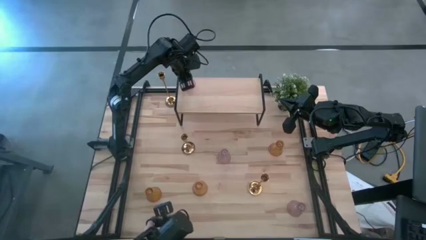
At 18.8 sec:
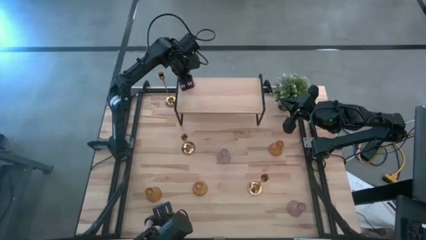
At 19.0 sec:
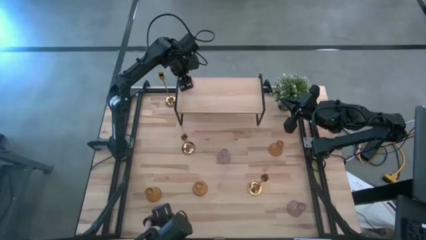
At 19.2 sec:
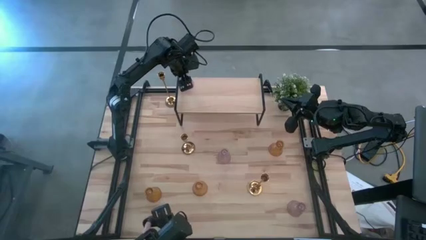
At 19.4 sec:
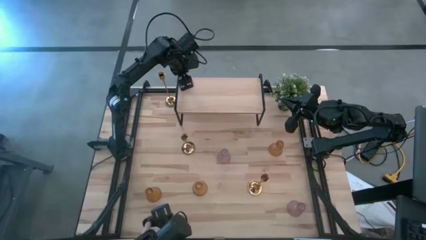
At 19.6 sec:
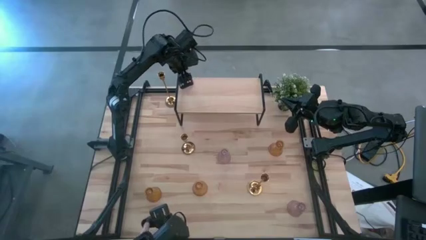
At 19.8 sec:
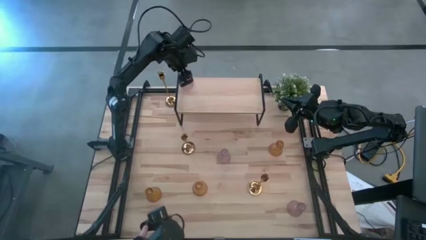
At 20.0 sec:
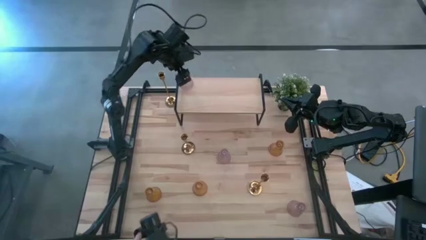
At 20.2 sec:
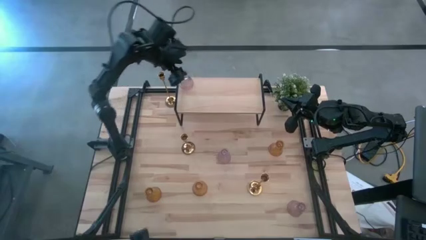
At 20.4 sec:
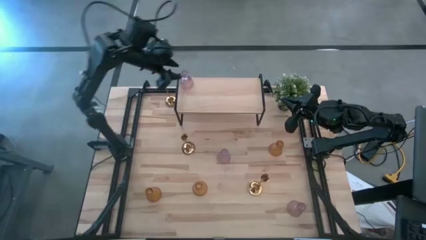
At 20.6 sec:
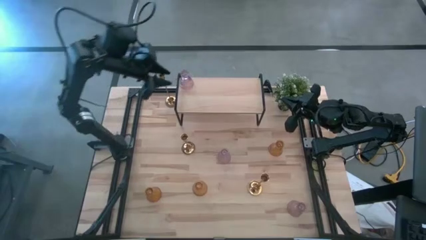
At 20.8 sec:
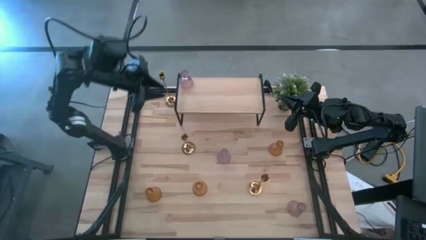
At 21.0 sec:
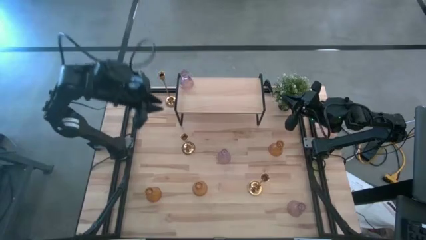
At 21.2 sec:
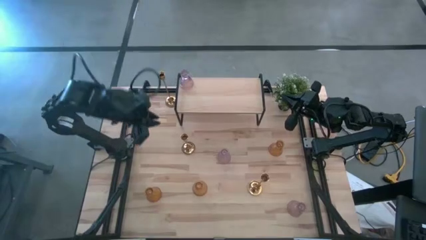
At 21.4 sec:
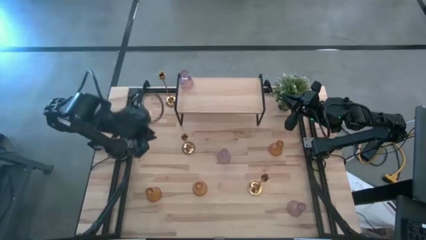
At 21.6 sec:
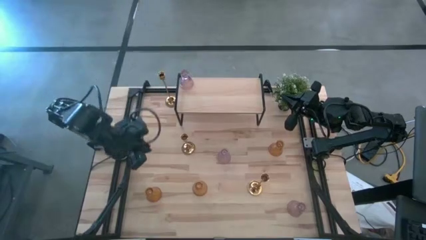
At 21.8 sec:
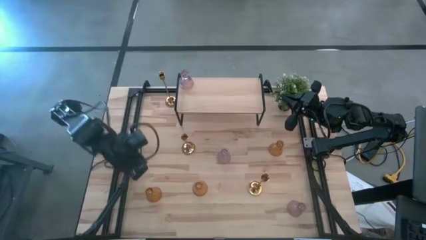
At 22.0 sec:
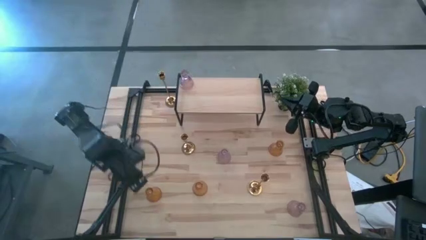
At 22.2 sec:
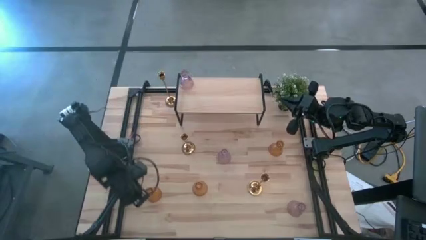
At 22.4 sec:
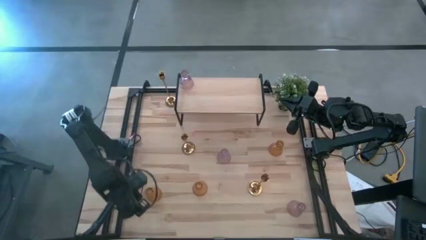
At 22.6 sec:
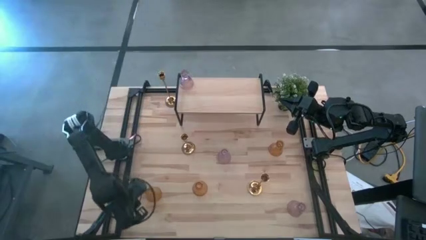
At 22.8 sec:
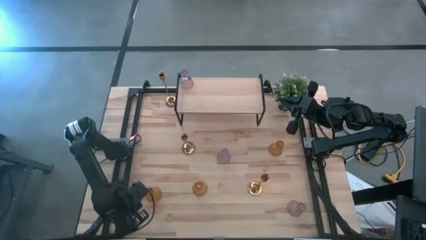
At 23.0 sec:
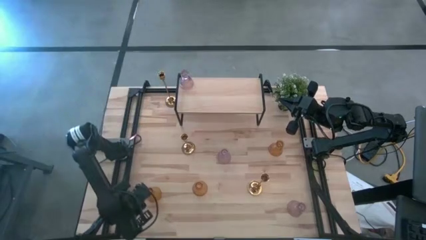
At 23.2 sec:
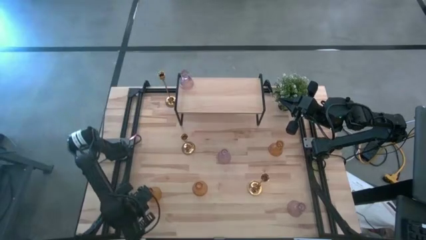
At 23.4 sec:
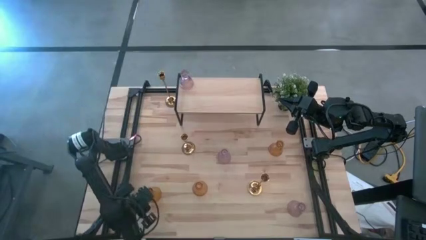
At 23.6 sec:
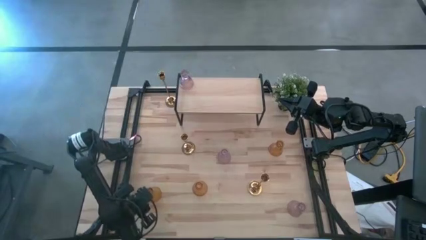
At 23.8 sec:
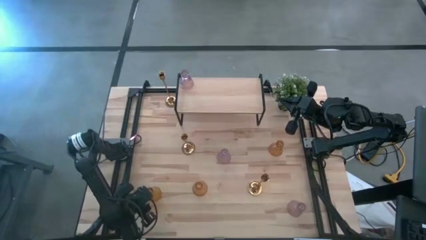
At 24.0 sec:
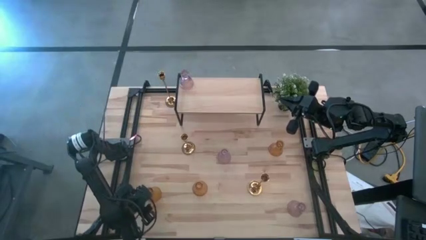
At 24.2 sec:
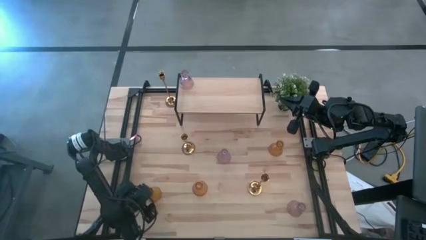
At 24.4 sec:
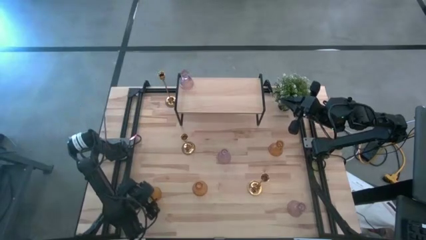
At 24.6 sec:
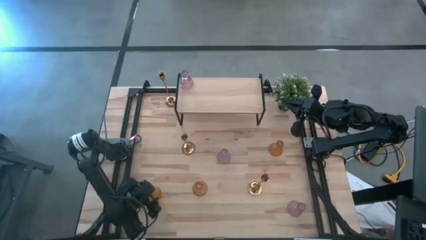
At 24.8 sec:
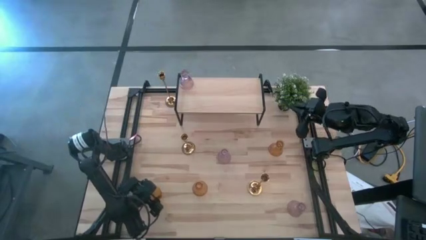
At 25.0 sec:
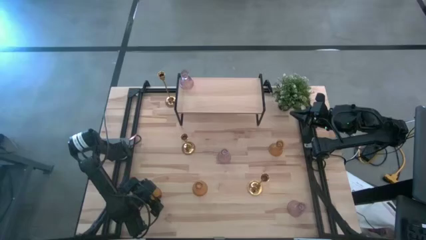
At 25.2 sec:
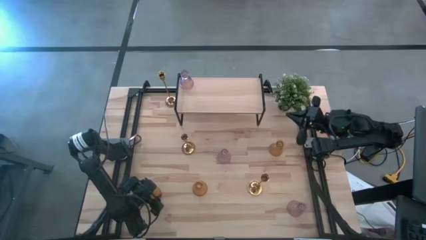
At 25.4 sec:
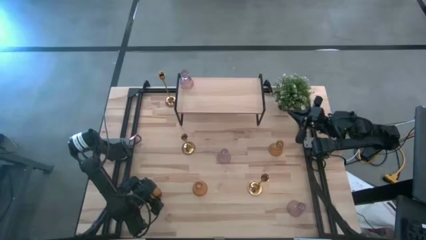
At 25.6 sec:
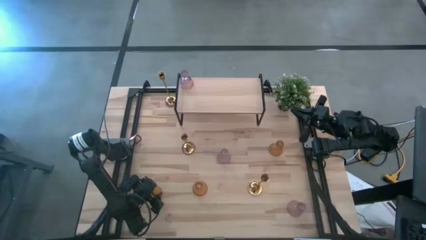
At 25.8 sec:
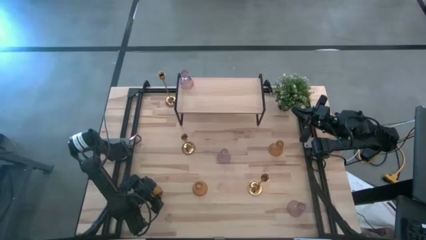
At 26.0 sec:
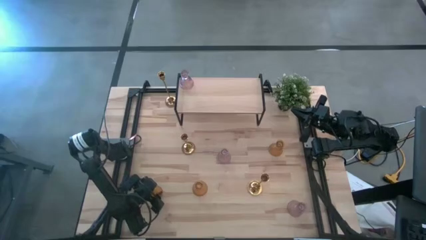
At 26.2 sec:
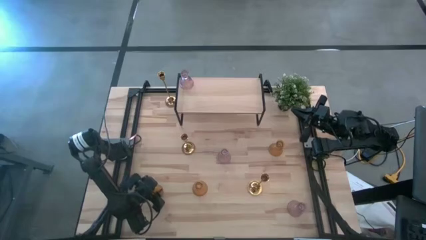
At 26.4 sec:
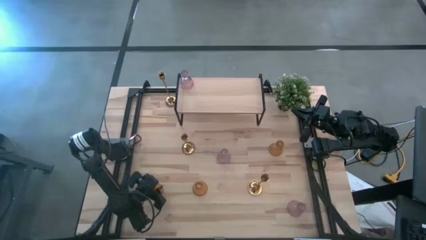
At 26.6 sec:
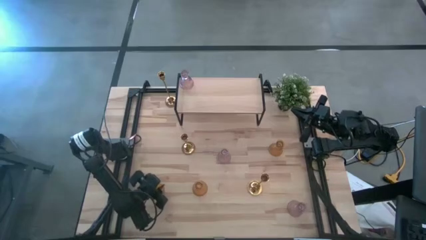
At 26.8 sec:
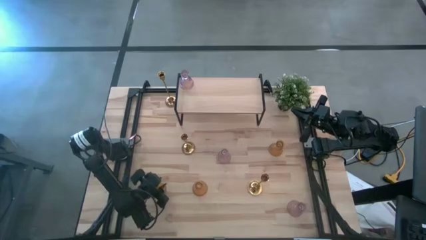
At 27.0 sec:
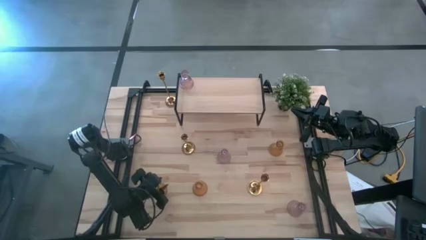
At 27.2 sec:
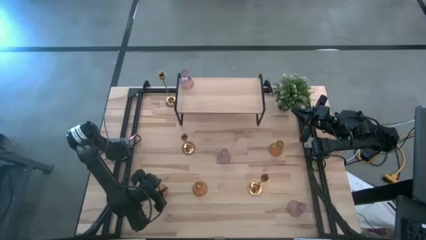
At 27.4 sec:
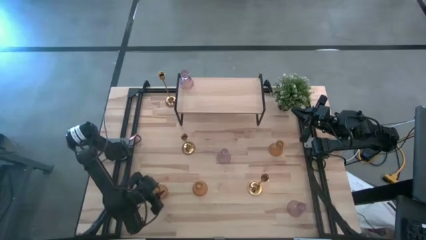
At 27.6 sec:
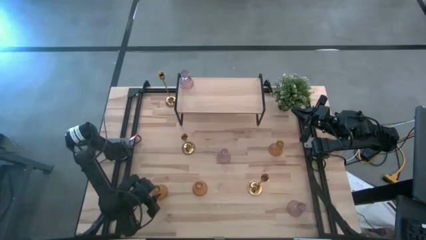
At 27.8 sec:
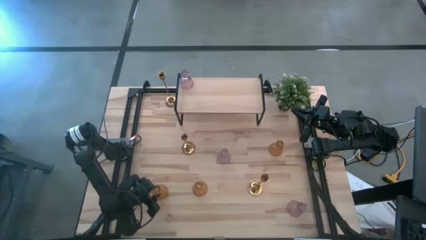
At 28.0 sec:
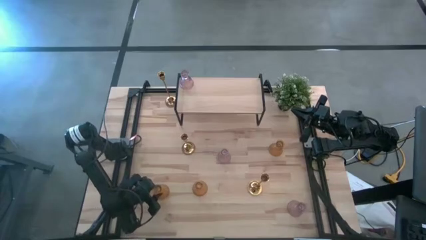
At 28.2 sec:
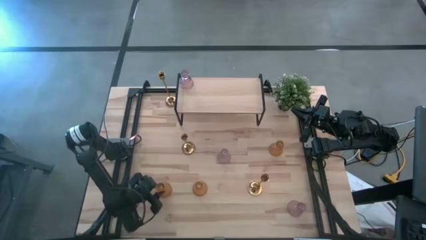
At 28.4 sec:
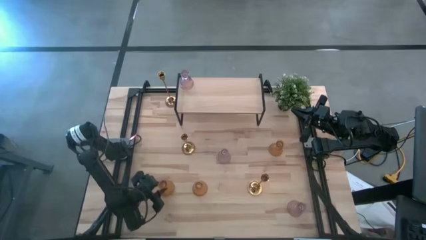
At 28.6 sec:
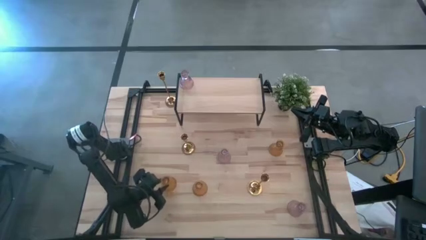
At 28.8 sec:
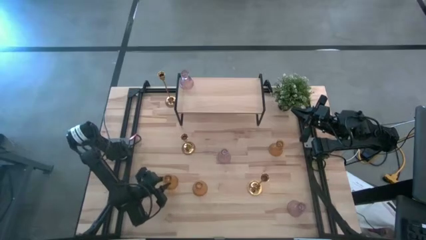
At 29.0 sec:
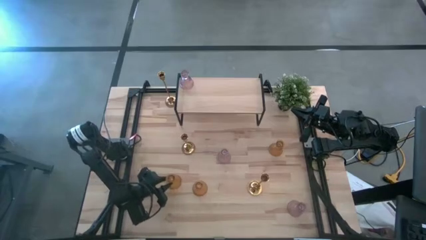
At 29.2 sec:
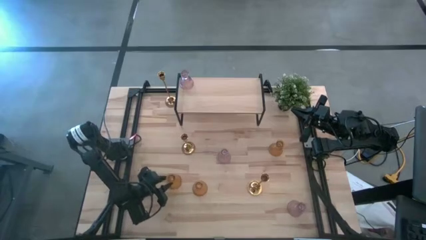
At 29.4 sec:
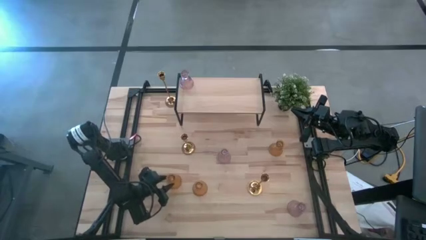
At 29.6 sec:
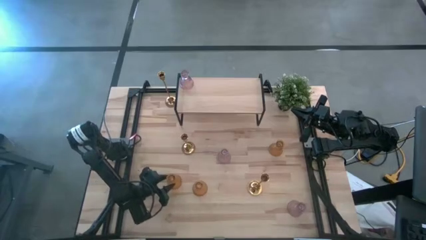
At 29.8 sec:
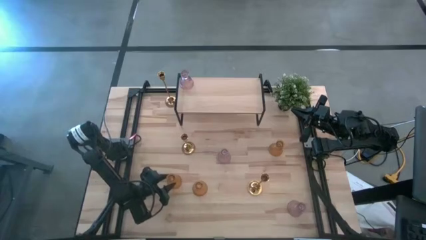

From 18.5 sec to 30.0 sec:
Task: Pick & Place candle stick holders
Put the bottom left yellow glass candle holder on the shelf aligned with the other glass candle holder
